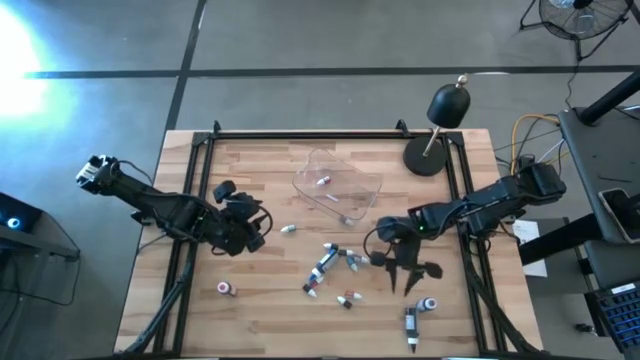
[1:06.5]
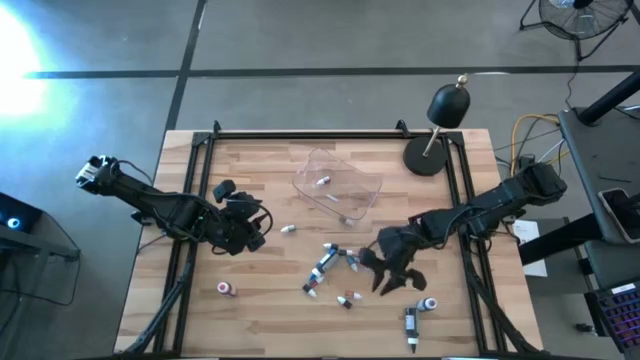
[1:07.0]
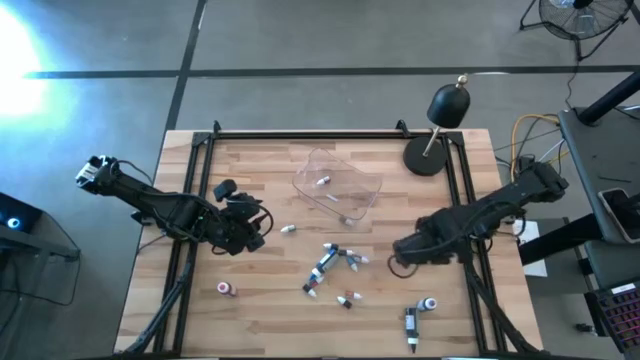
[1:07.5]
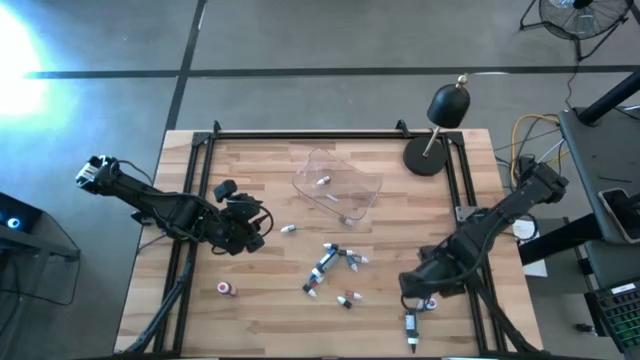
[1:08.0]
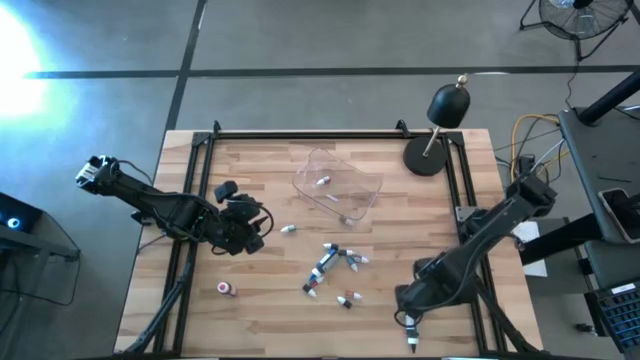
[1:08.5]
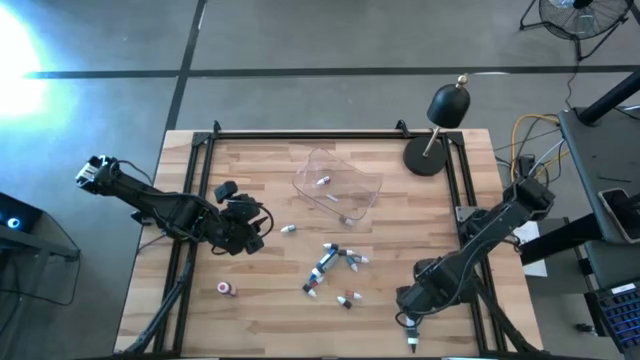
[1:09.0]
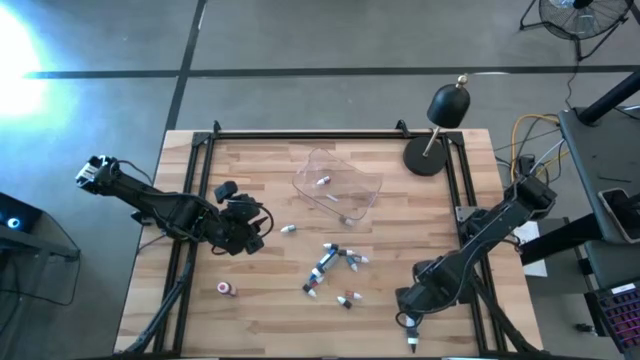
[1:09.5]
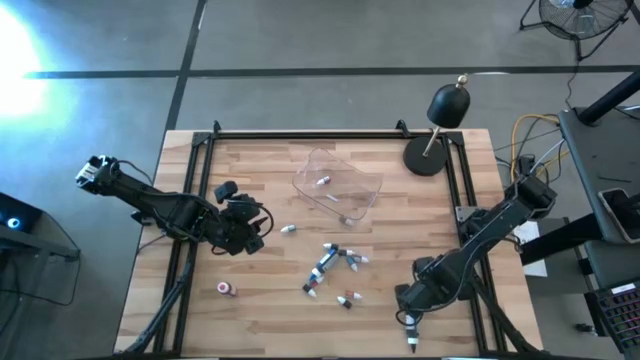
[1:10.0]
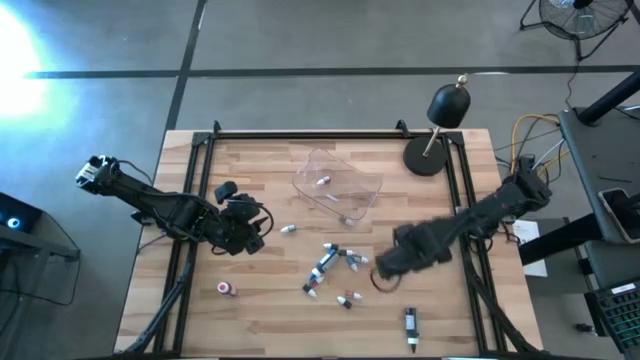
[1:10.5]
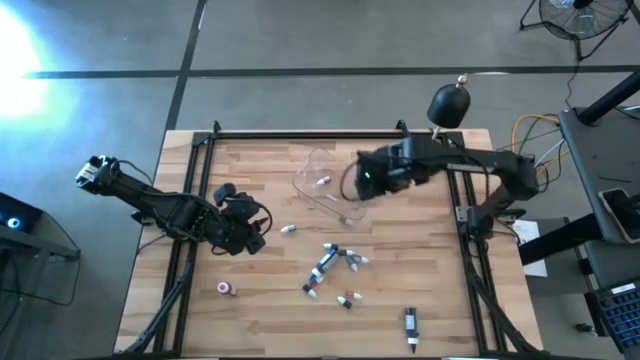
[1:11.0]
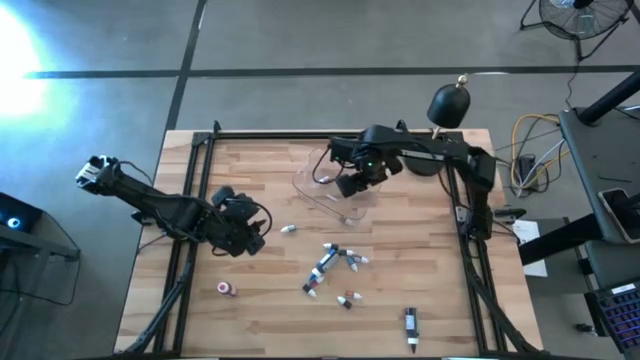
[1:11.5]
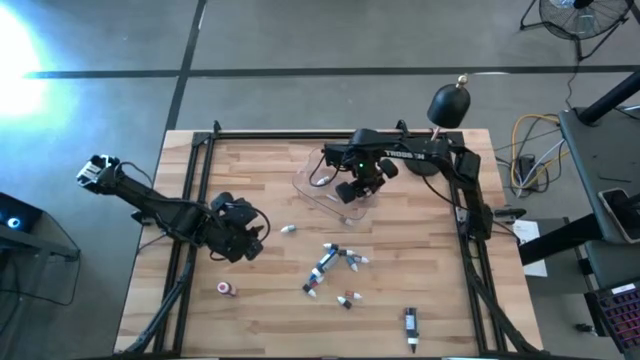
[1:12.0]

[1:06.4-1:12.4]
Task: Pick & Place food coloring
Put the large purple food coloring bottle into the transparent bin

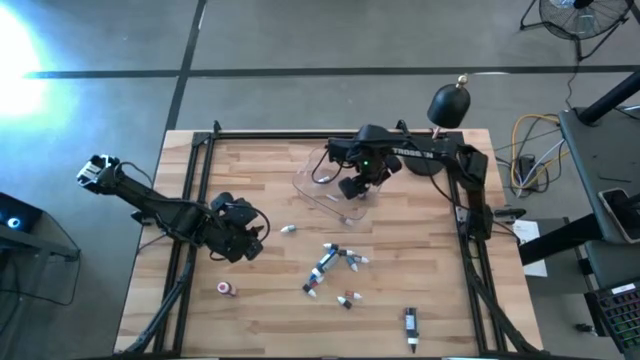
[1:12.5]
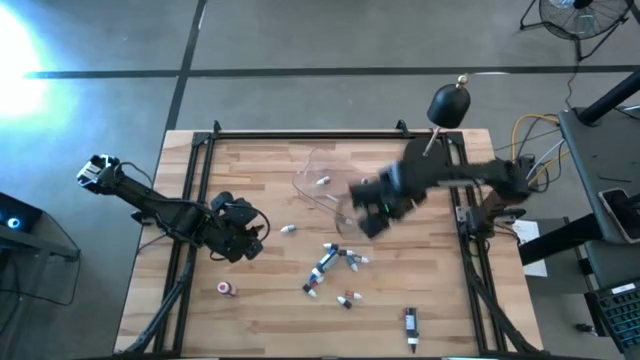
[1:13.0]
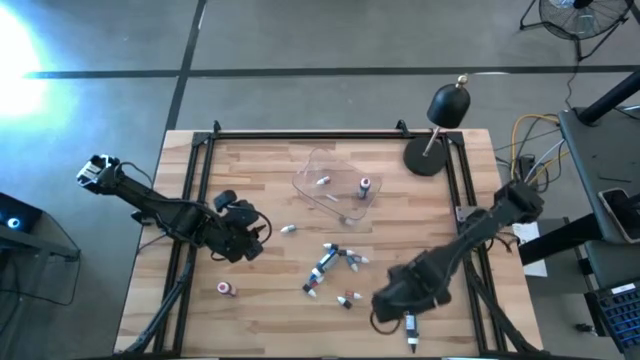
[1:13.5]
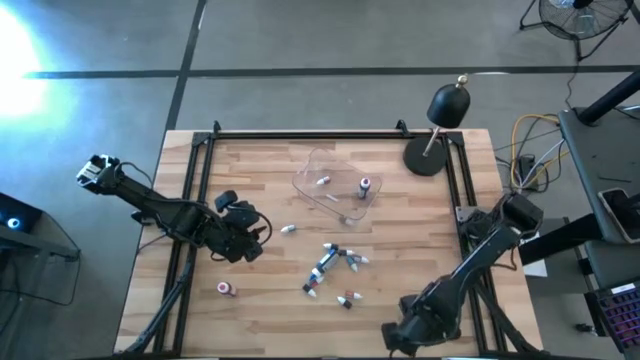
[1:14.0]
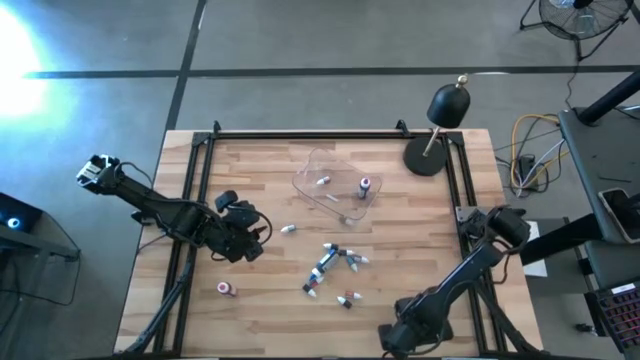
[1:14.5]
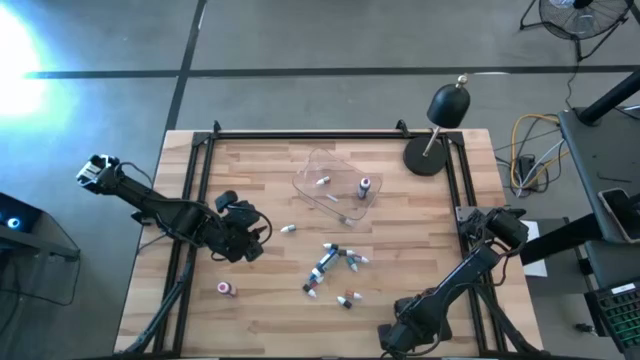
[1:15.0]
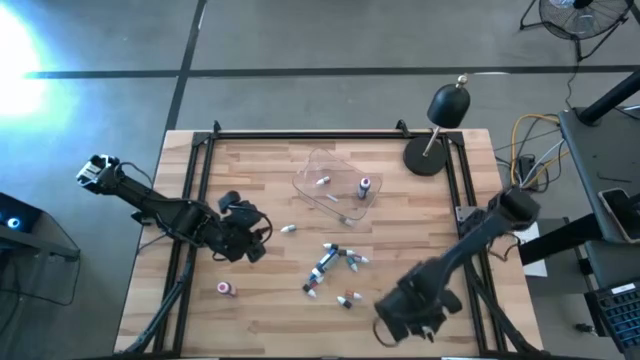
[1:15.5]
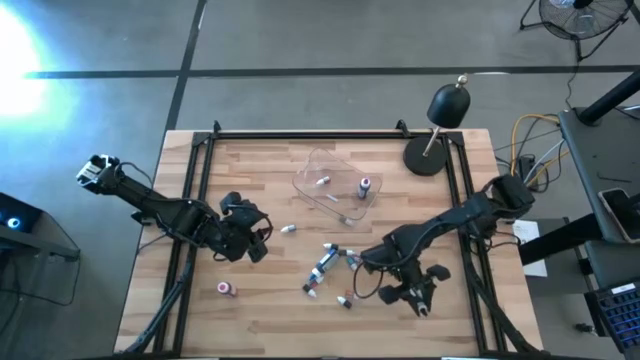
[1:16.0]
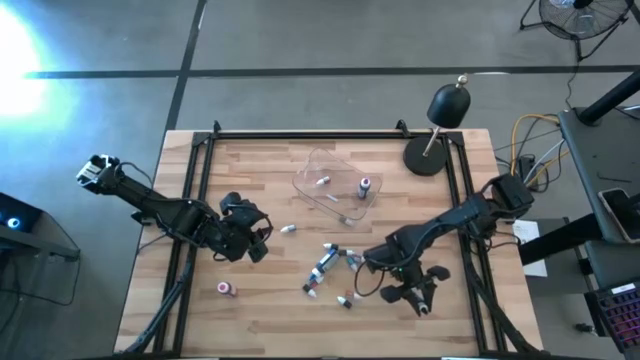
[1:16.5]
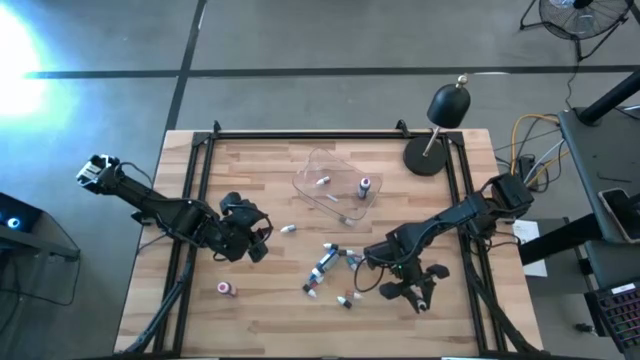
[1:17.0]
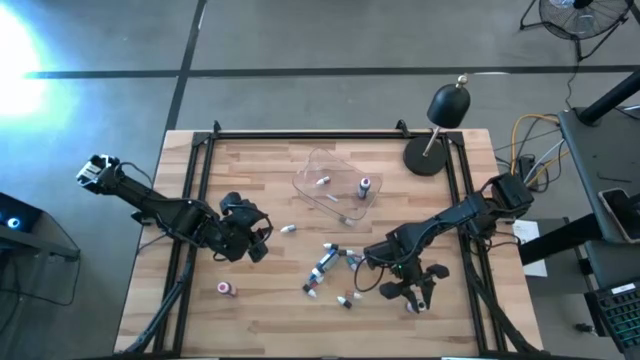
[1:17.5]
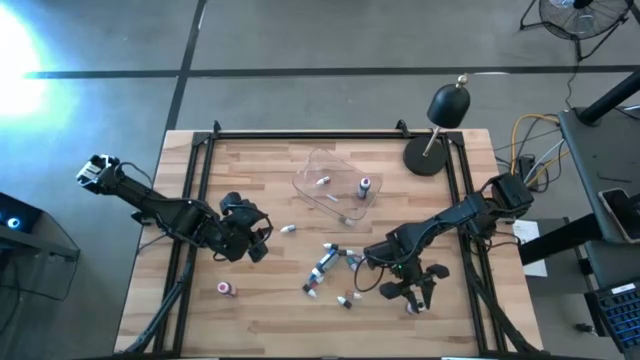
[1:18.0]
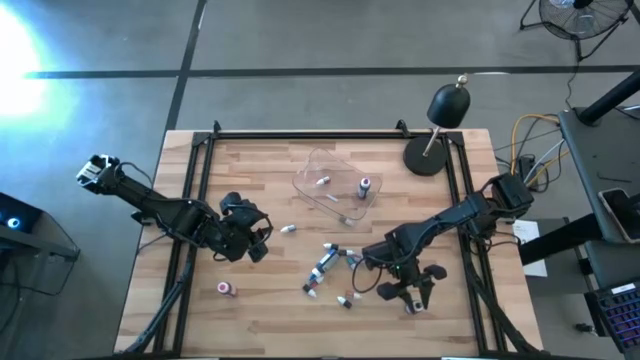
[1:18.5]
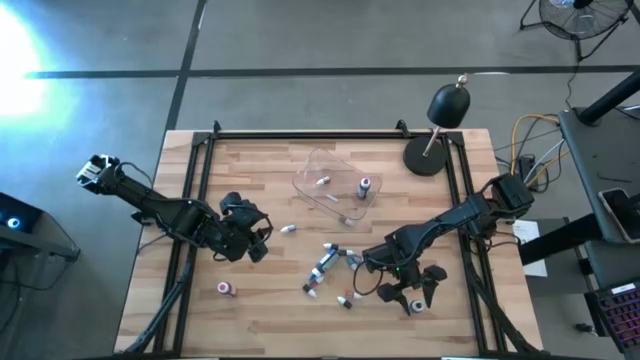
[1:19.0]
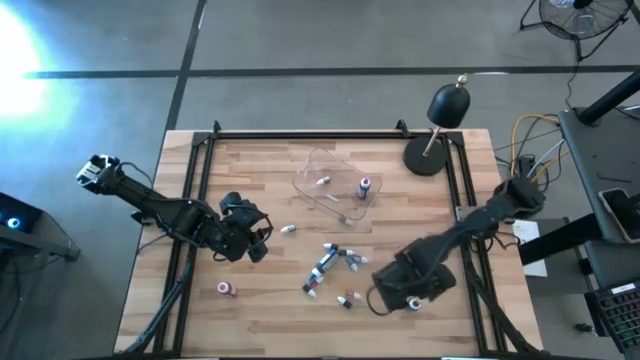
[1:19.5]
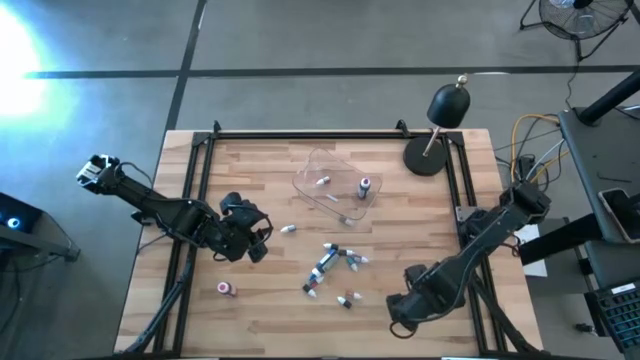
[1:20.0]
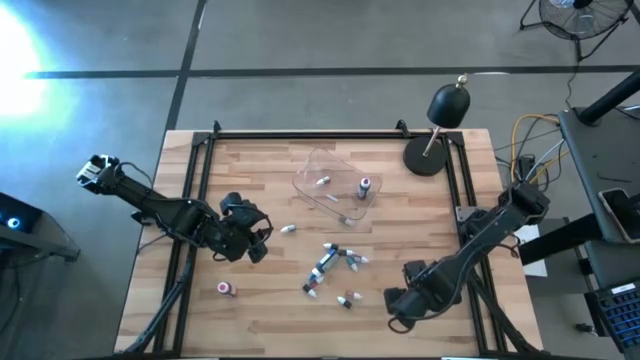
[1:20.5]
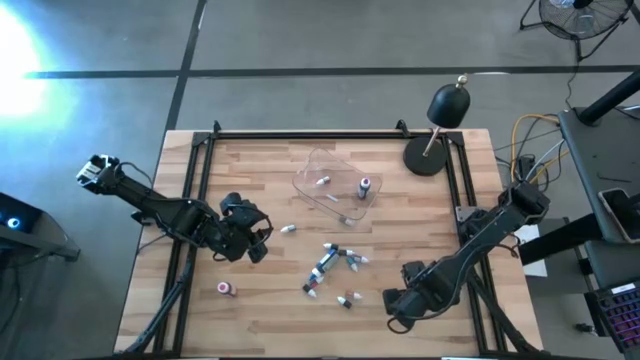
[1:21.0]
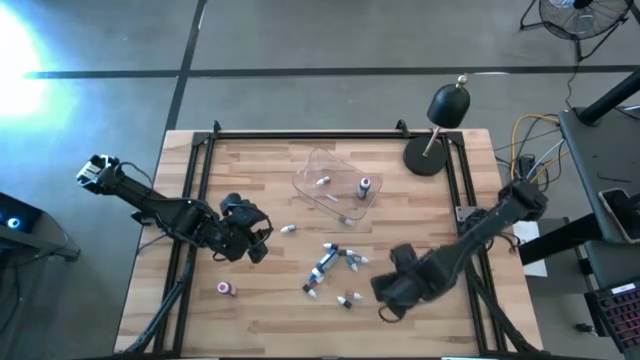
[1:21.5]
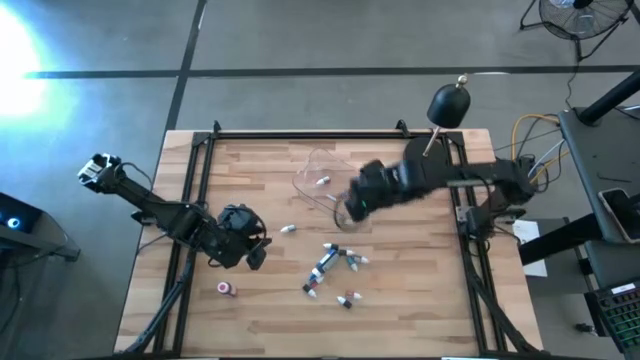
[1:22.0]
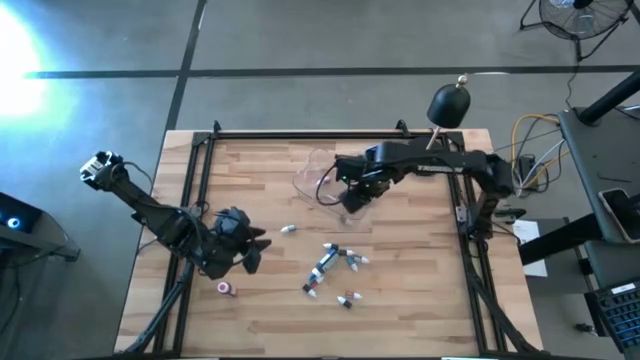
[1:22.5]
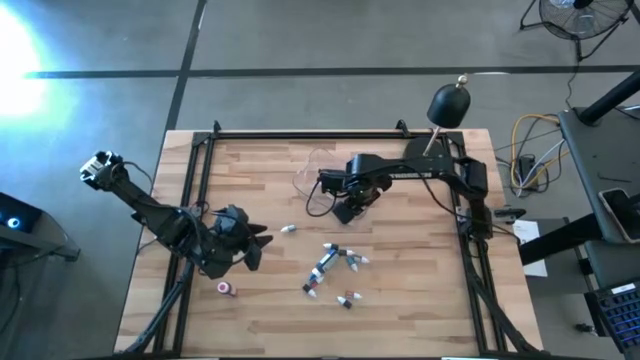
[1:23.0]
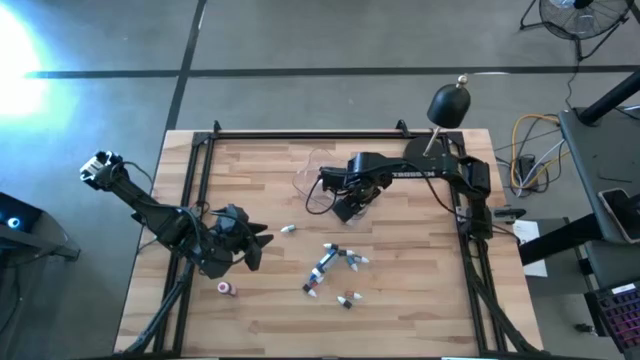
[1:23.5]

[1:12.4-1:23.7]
Put the large black food coloring bottle into the transparent bin

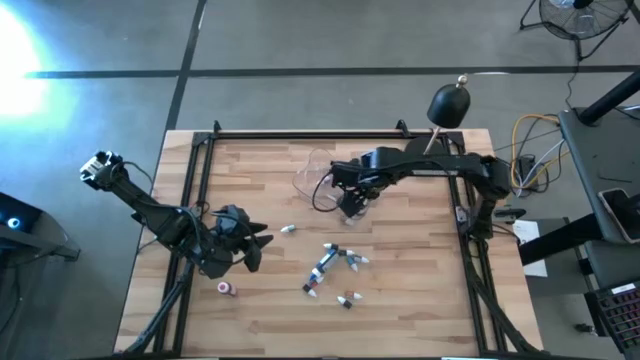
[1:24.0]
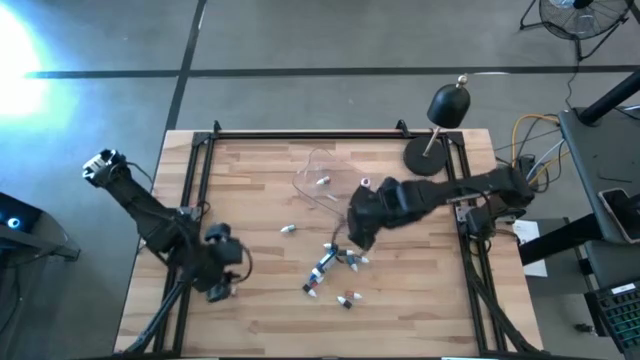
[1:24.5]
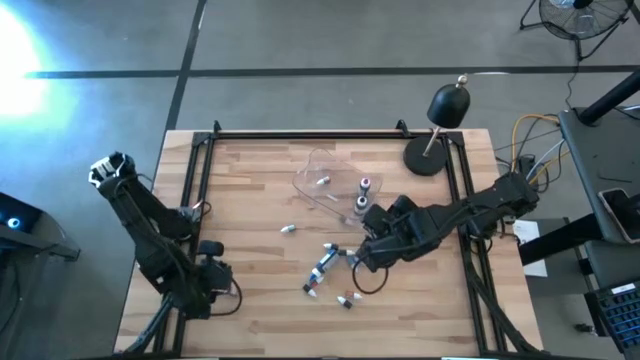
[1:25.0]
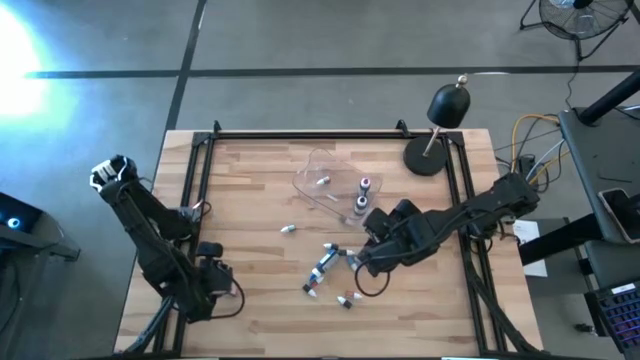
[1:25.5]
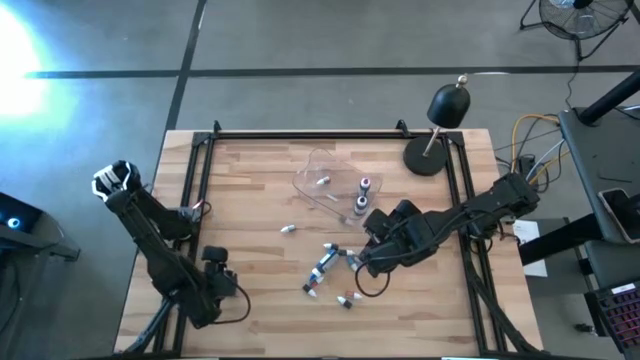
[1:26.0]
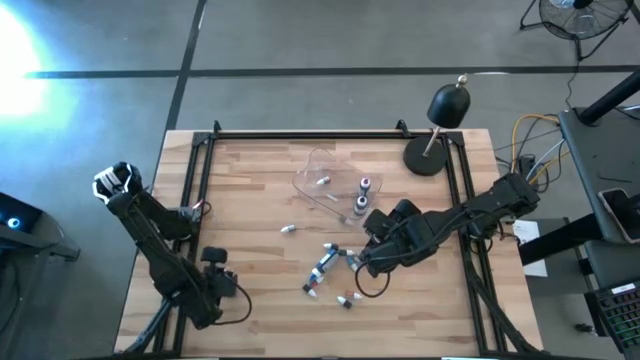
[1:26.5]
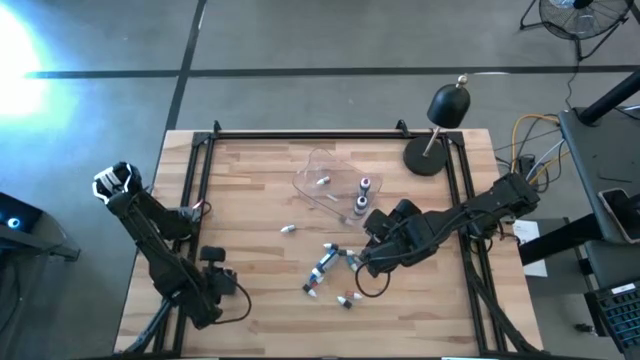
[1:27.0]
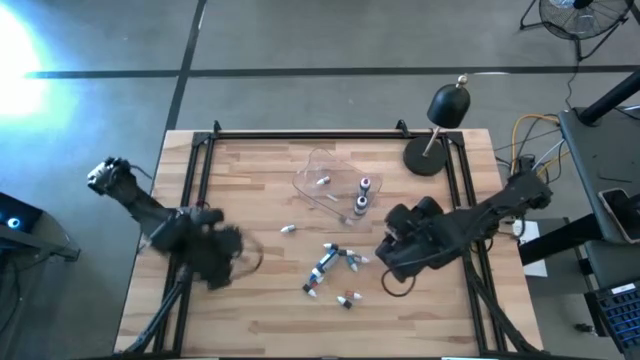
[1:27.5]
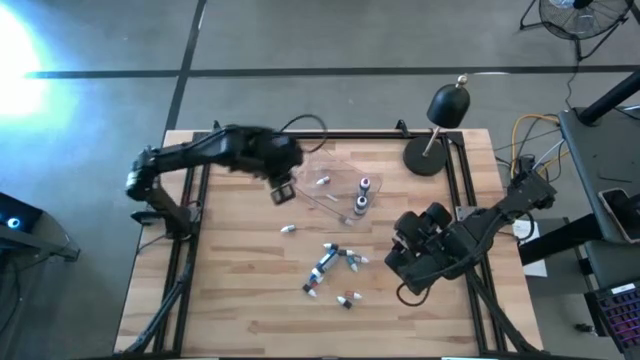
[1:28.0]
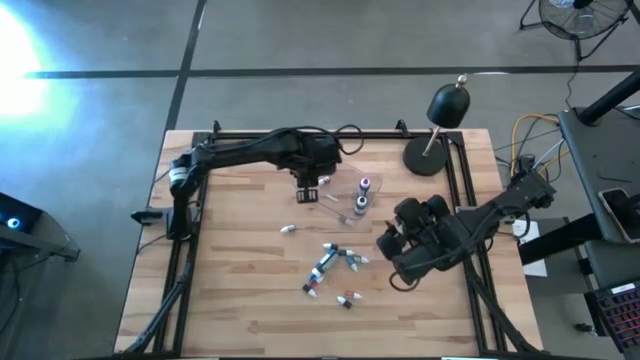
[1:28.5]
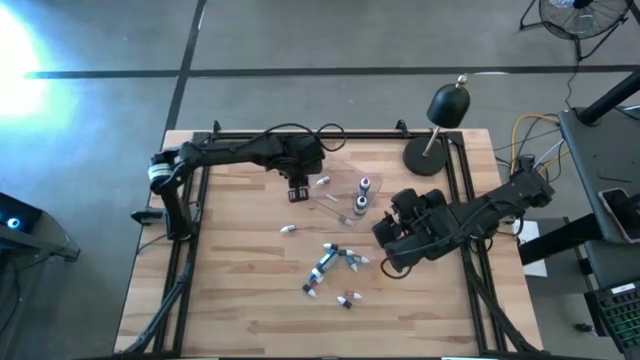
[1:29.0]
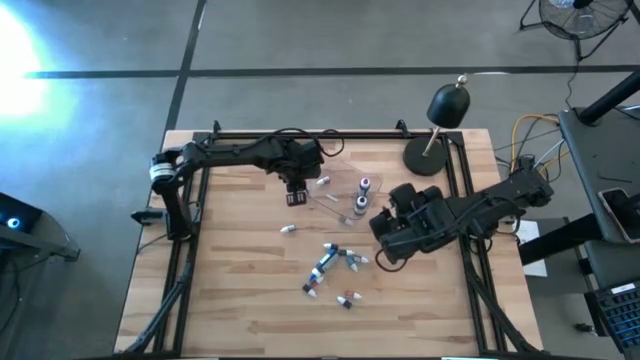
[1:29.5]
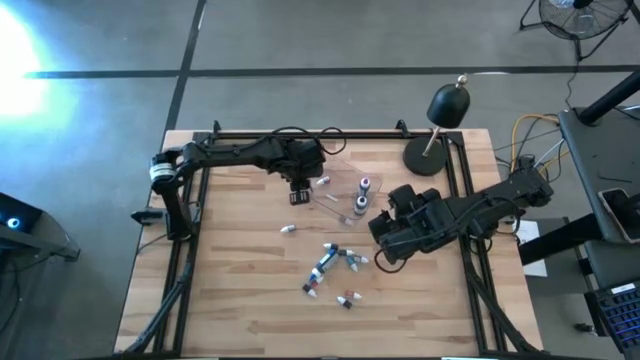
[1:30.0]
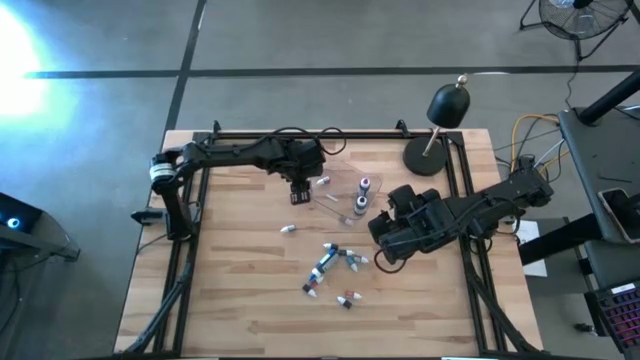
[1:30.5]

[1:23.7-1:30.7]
Put the large pink food coloring bottle into the transparent bin
